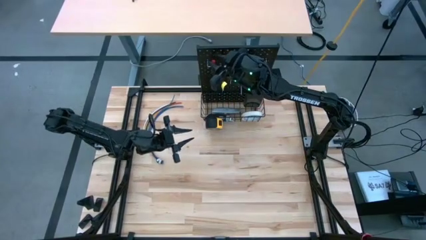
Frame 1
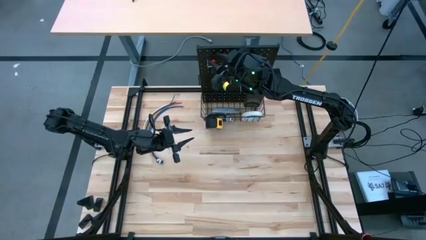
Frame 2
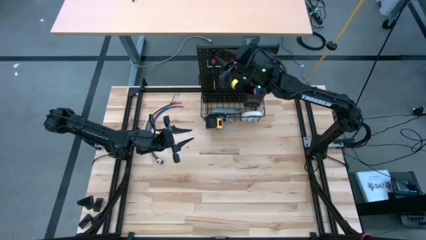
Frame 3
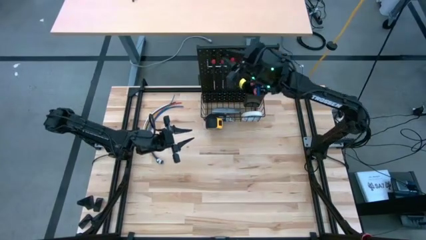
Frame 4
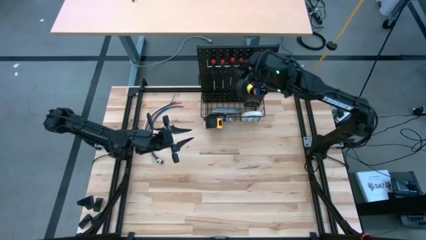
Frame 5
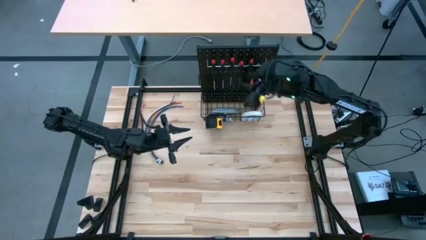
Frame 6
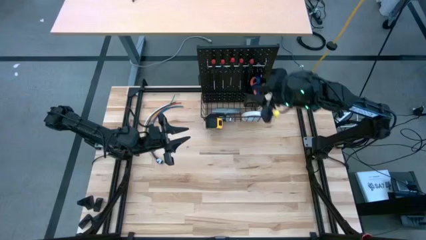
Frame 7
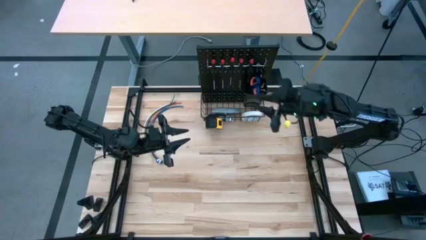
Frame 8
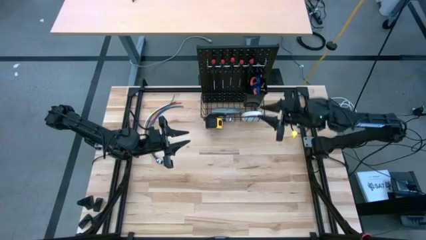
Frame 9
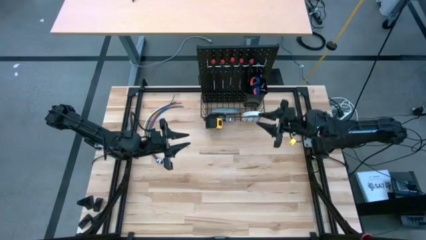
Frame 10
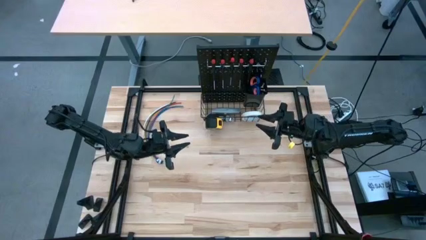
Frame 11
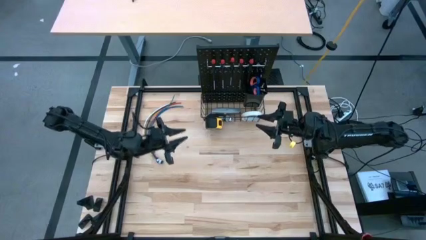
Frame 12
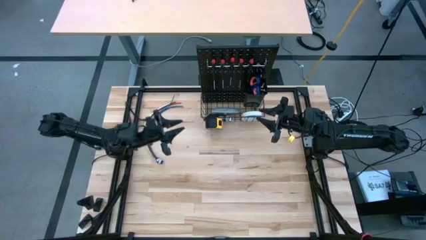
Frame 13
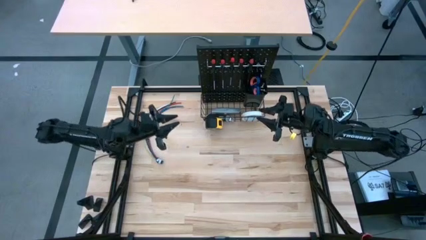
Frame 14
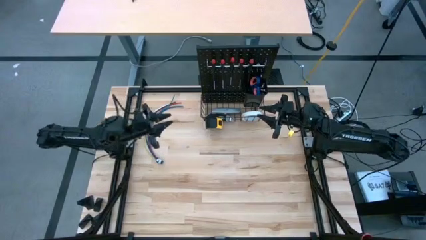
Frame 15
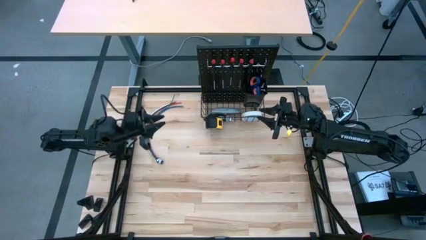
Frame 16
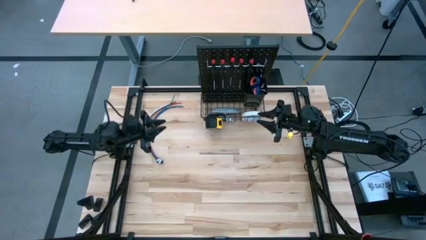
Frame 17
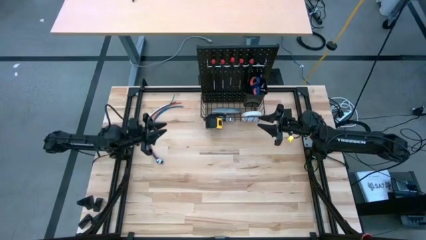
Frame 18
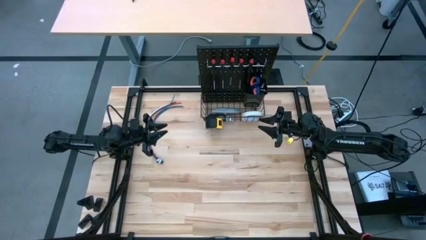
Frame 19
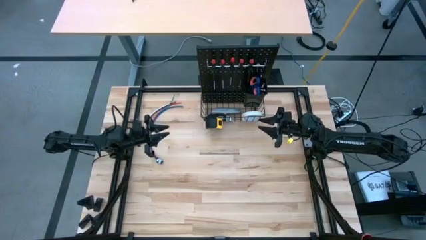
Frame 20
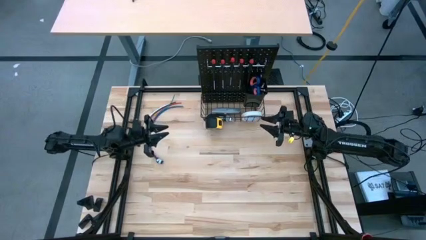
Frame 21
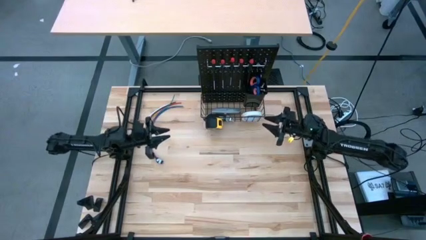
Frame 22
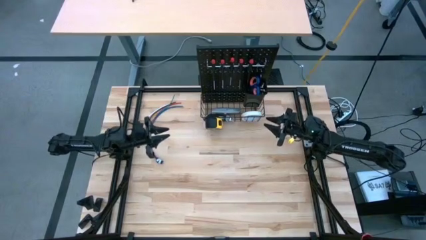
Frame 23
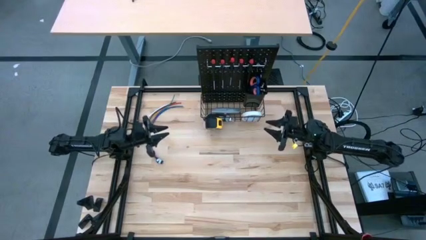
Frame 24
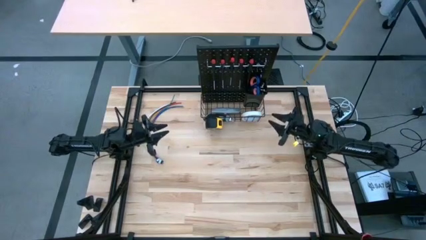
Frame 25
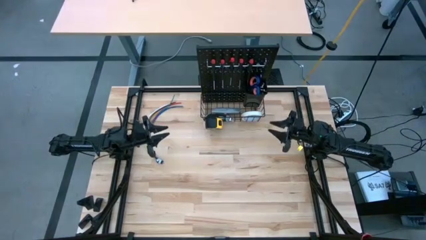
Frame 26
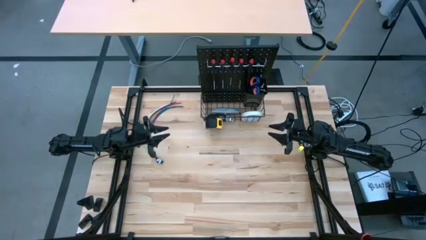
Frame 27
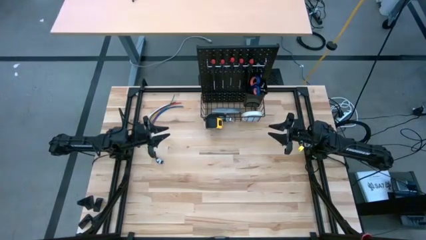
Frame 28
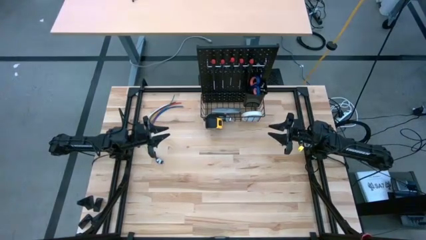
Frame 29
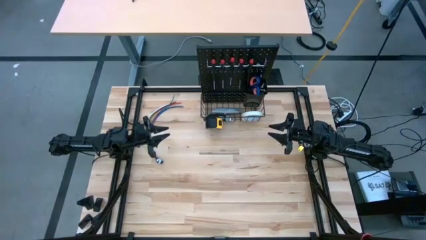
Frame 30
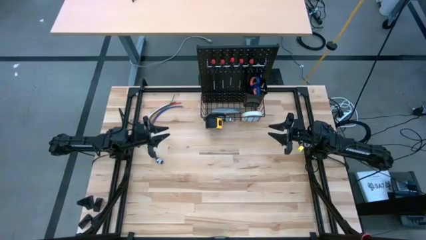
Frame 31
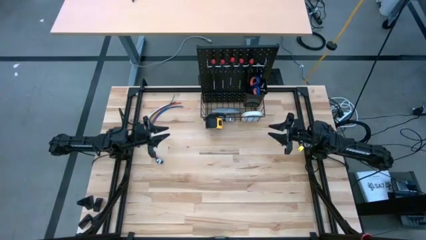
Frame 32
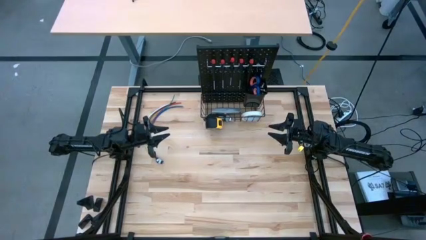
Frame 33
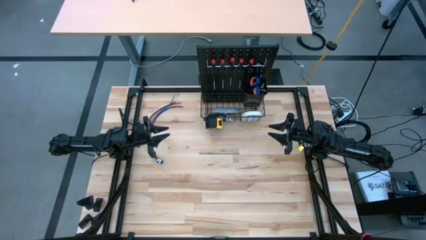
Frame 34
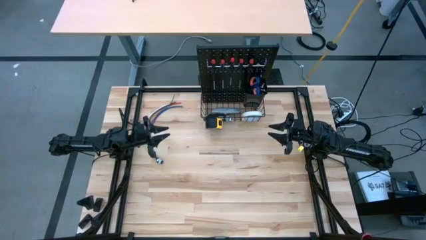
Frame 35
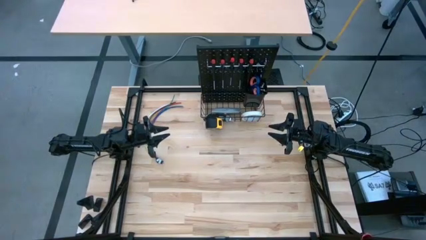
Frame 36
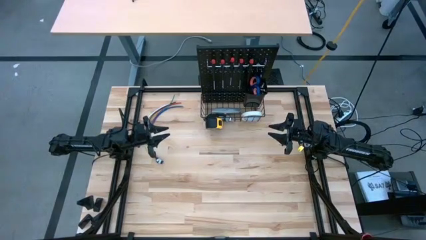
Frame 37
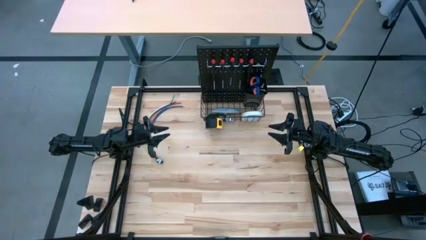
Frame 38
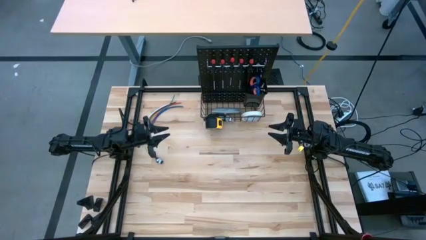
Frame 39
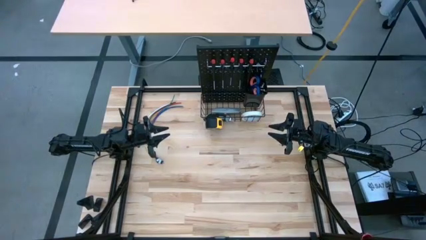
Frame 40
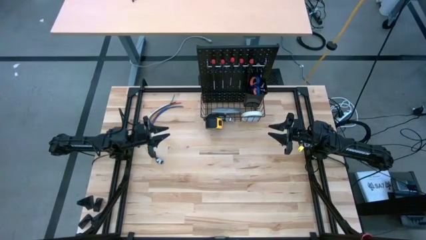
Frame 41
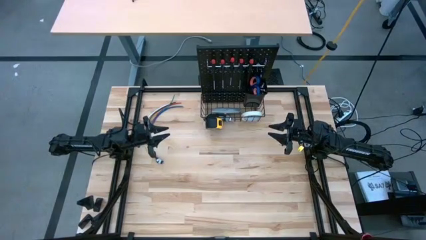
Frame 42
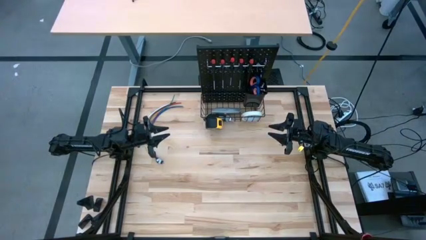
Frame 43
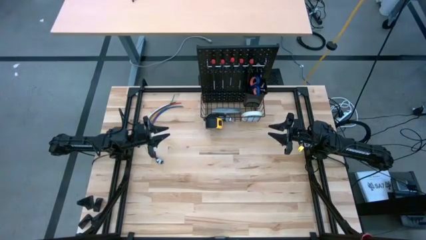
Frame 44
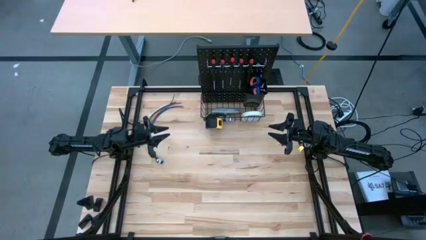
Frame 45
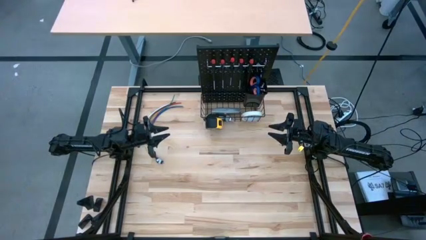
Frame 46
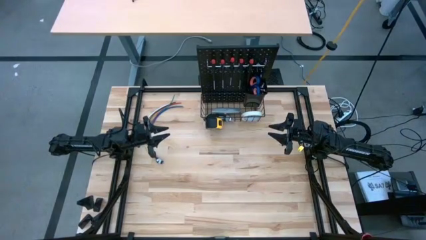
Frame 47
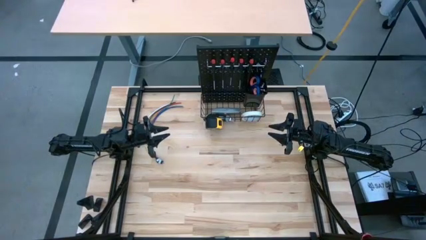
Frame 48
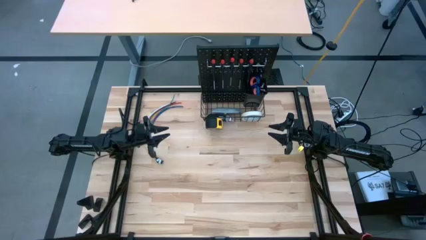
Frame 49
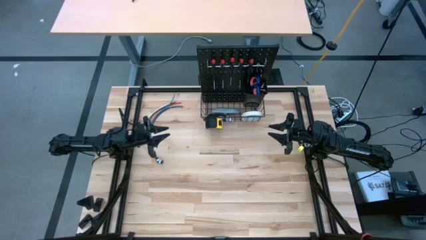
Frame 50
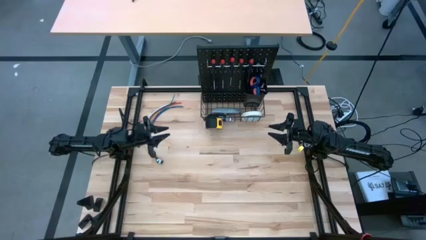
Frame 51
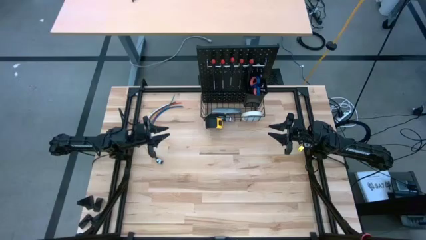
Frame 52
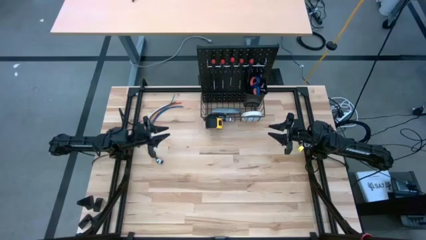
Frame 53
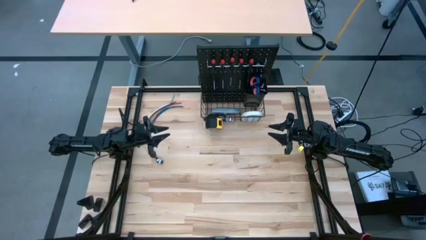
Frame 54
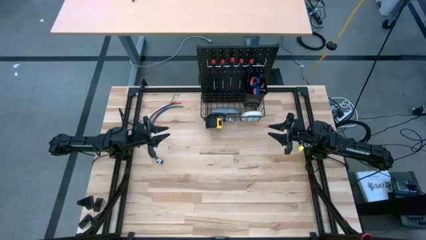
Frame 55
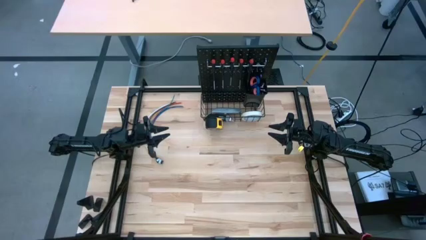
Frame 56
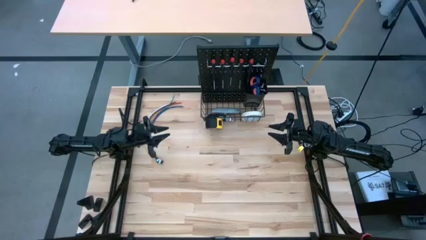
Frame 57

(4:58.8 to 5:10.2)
Task: Hang tools onto peg board
Return to Home Position
